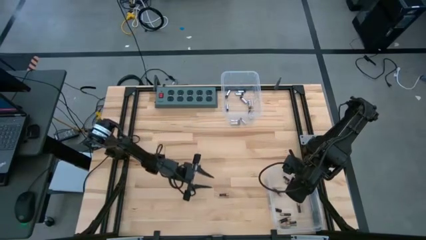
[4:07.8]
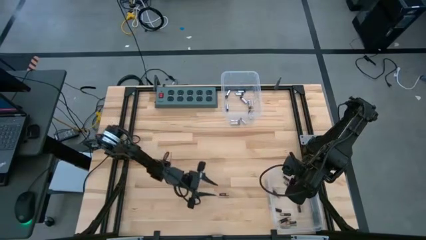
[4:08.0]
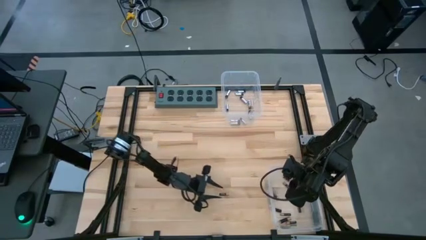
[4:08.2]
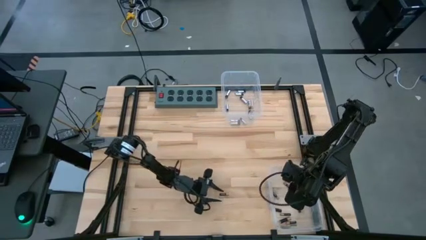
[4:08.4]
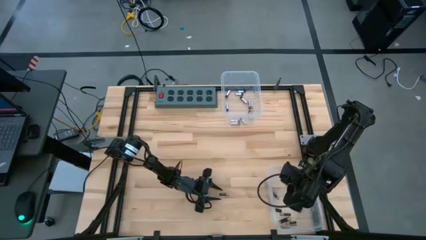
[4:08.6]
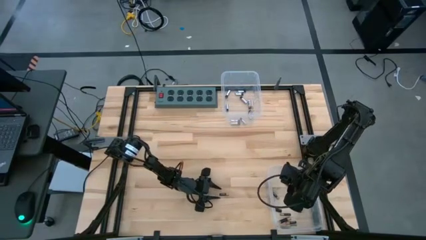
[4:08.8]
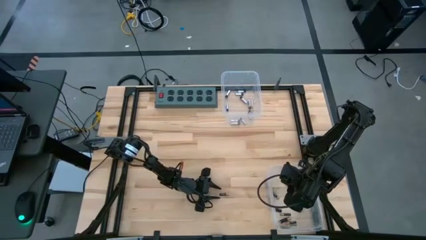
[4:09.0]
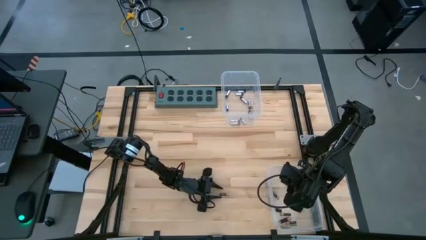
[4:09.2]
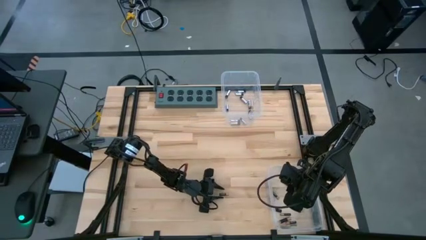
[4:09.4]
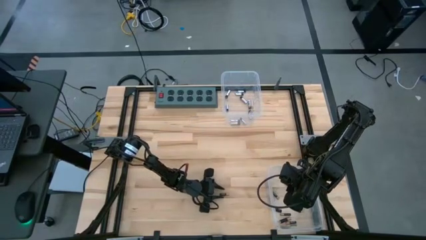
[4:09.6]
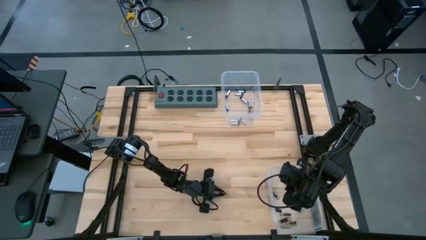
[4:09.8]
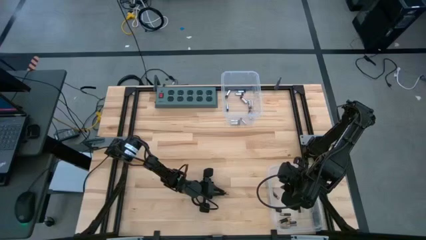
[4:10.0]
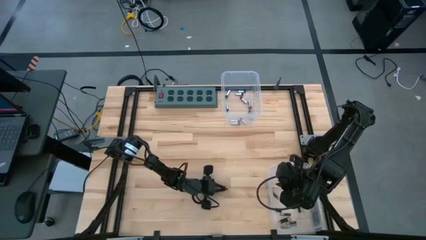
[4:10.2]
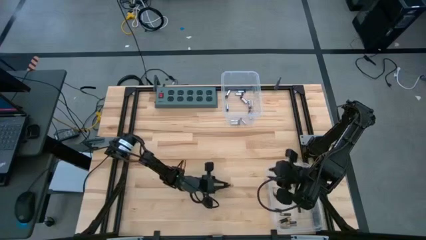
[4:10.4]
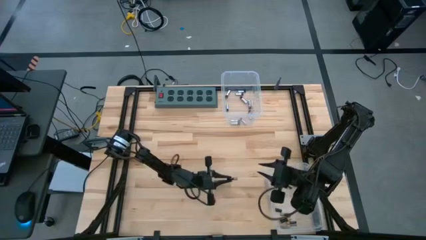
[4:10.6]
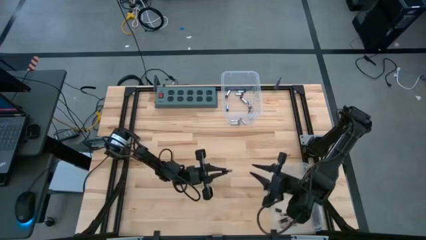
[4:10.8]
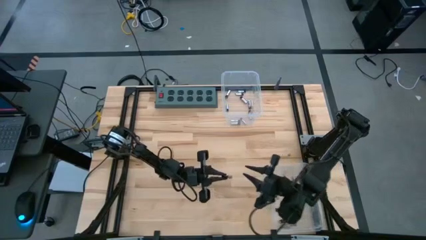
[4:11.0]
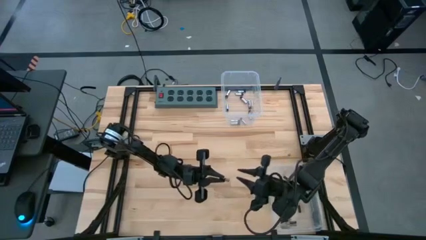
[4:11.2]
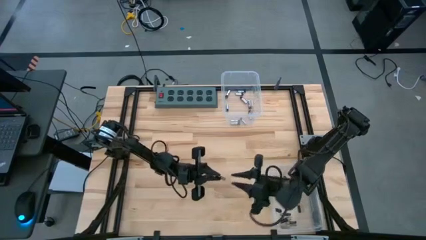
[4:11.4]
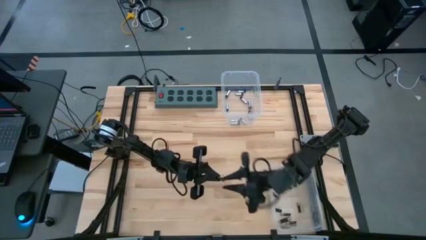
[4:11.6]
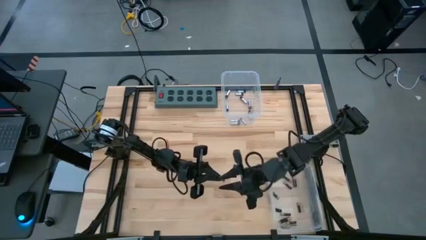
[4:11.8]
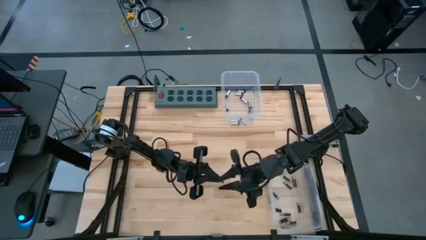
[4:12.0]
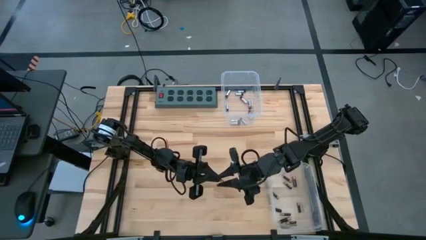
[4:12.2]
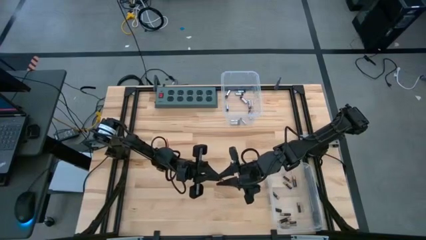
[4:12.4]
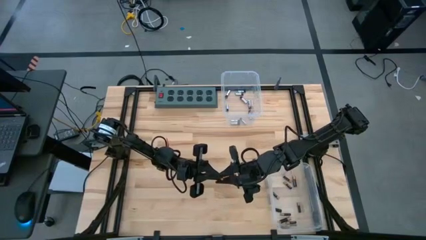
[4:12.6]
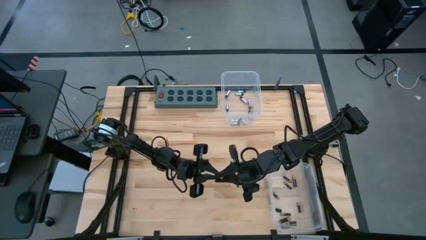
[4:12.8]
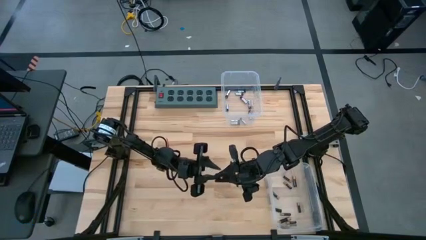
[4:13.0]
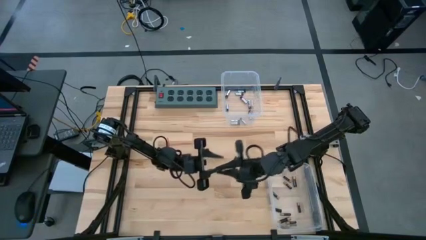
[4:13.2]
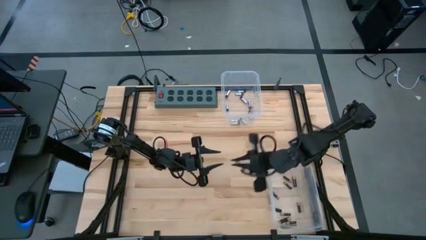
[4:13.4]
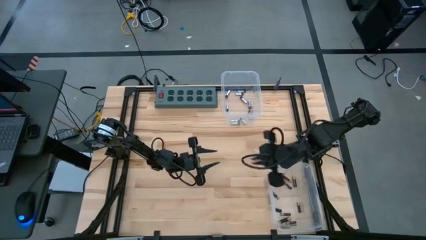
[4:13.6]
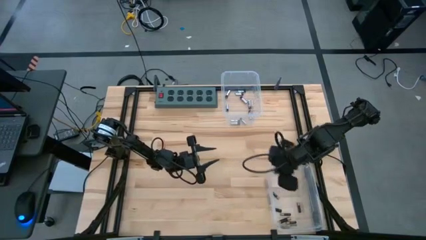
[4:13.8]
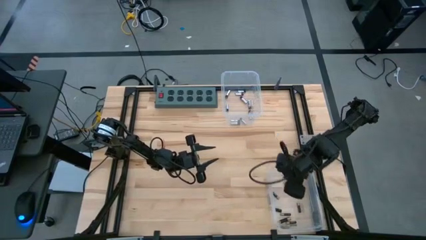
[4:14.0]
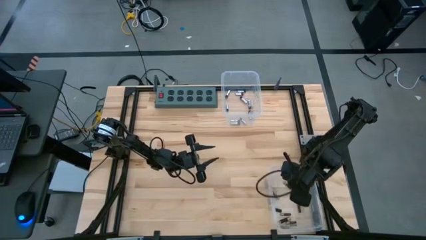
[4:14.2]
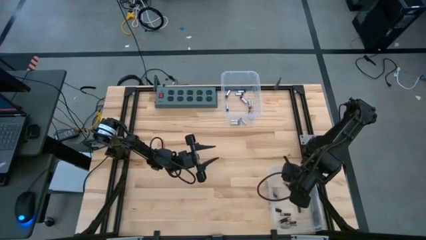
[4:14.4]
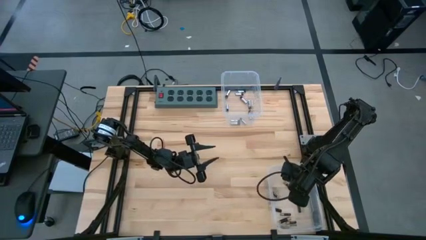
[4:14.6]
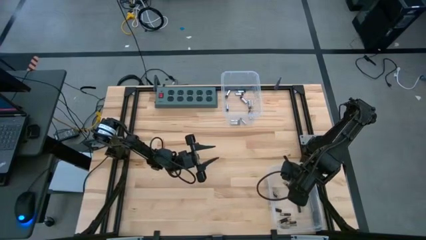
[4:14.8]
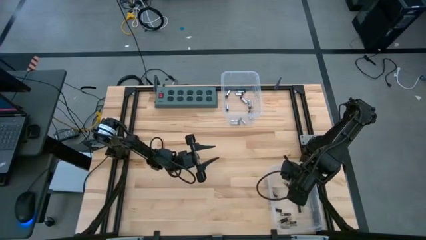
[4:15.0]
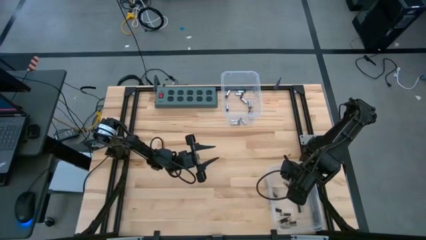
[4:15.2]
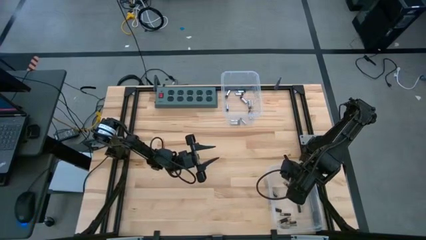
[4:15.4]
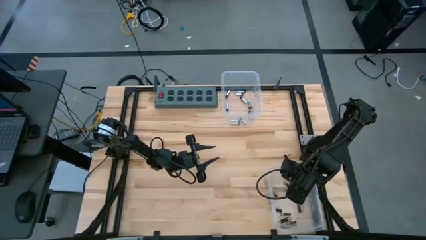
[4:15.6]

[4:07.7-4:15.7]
Task: Sort batteries
Put the black battery into the bottom transparent bin

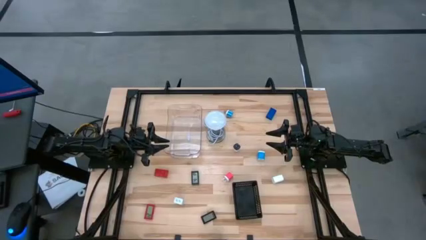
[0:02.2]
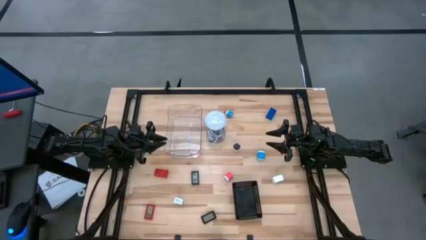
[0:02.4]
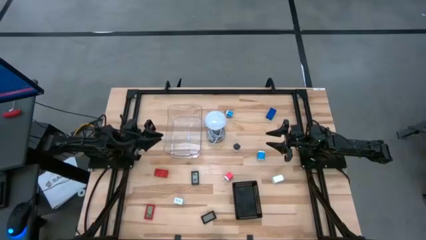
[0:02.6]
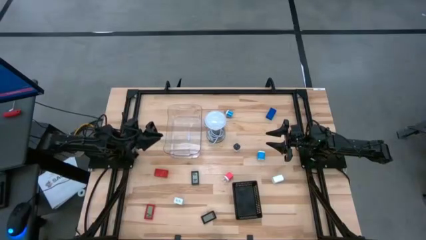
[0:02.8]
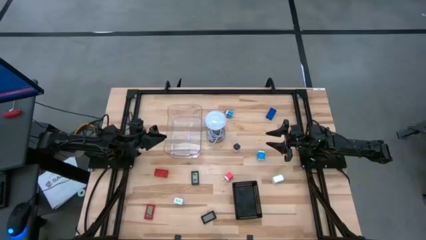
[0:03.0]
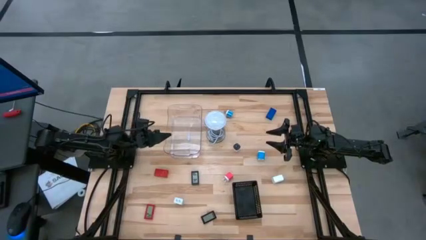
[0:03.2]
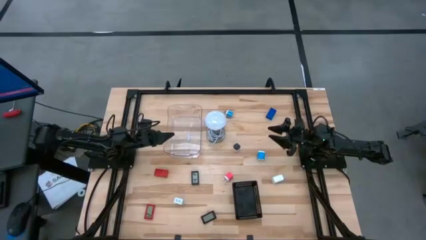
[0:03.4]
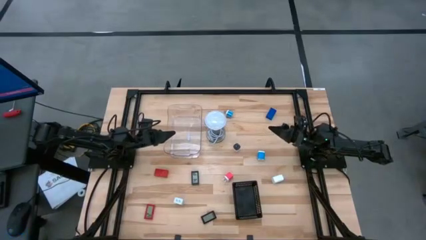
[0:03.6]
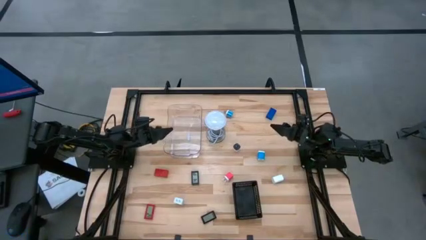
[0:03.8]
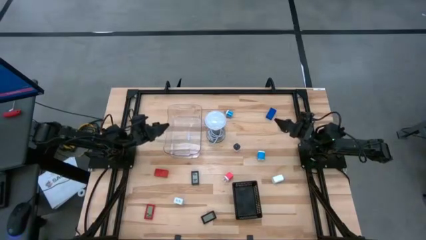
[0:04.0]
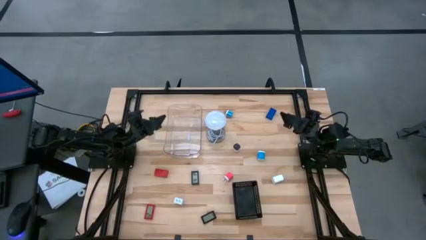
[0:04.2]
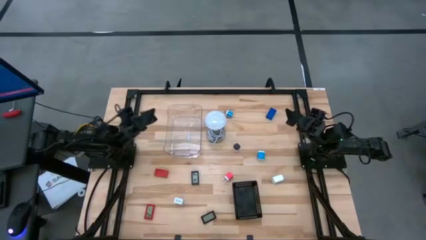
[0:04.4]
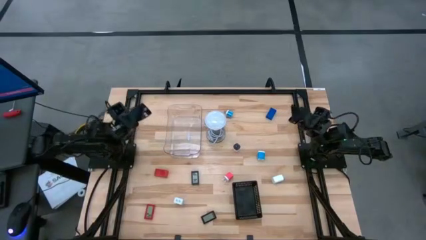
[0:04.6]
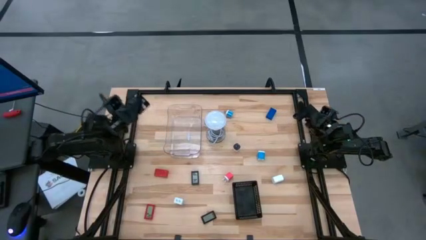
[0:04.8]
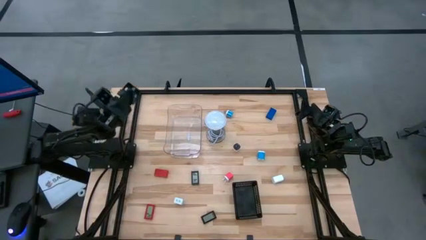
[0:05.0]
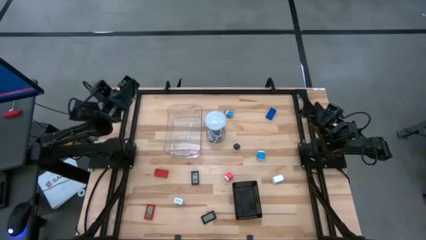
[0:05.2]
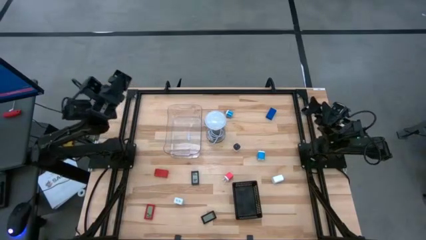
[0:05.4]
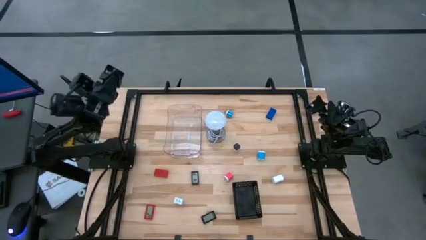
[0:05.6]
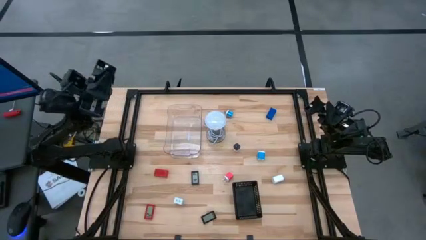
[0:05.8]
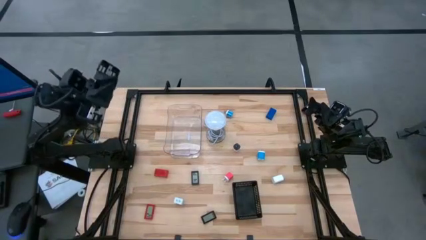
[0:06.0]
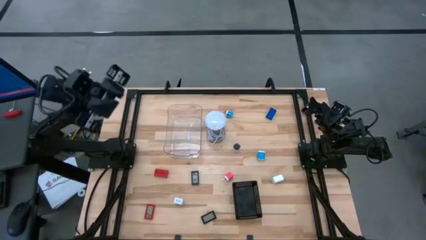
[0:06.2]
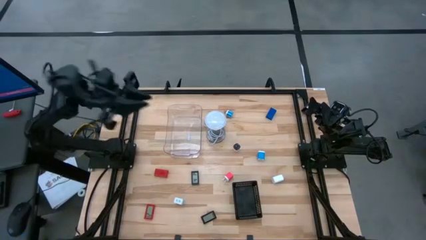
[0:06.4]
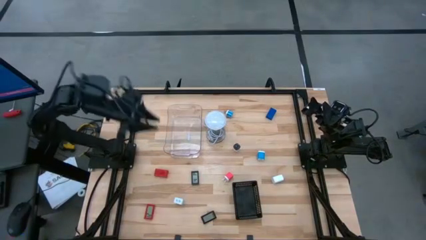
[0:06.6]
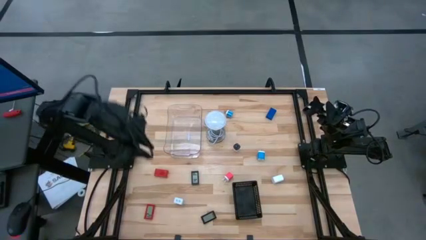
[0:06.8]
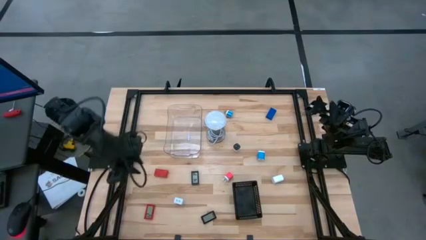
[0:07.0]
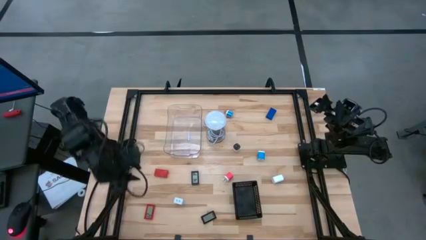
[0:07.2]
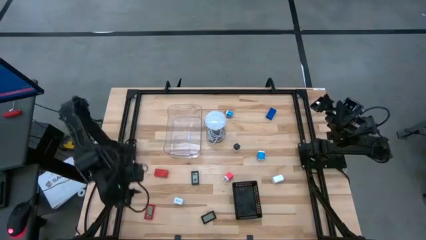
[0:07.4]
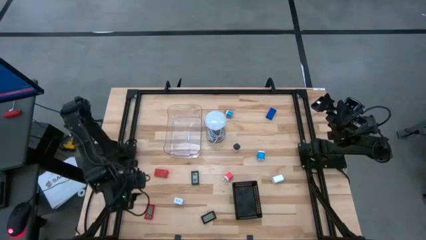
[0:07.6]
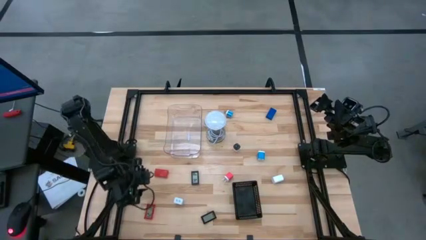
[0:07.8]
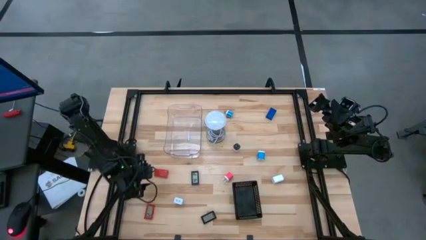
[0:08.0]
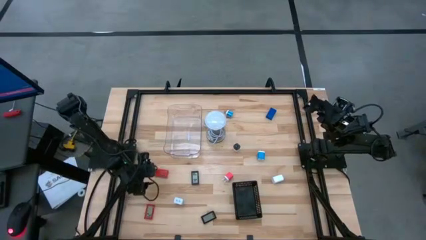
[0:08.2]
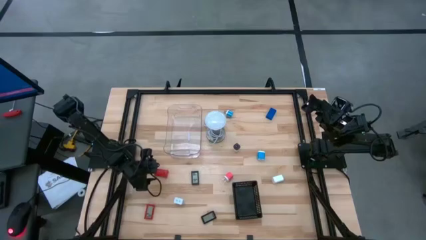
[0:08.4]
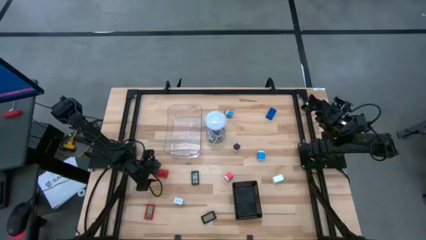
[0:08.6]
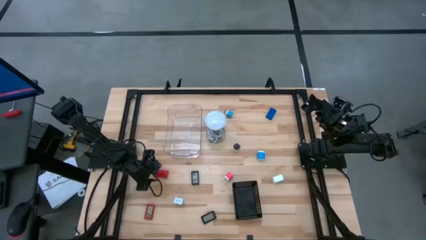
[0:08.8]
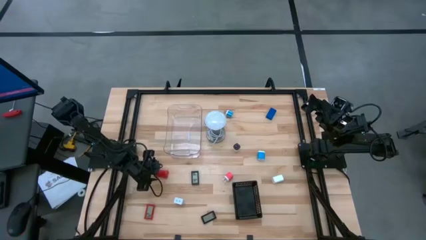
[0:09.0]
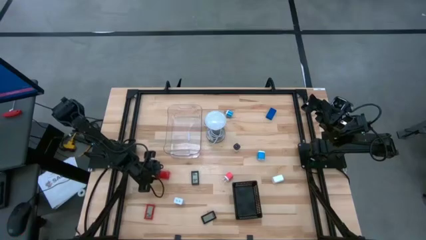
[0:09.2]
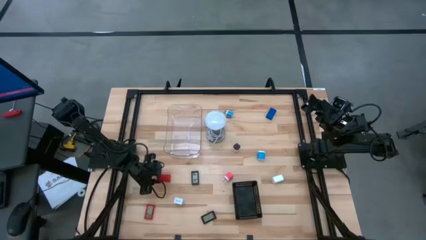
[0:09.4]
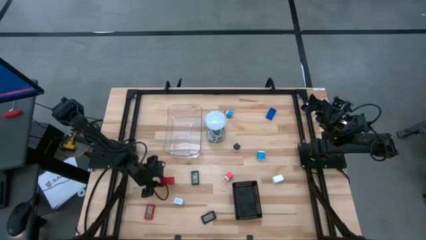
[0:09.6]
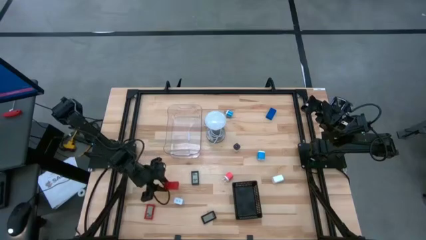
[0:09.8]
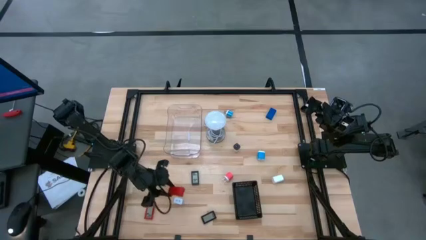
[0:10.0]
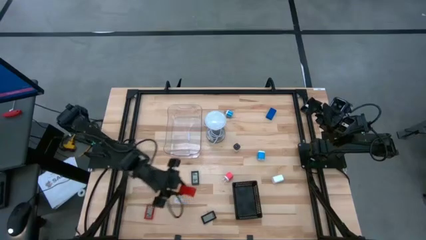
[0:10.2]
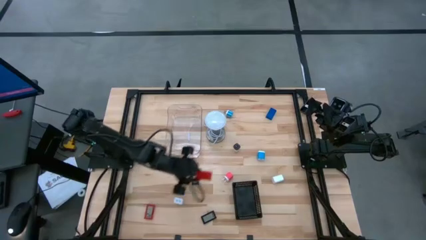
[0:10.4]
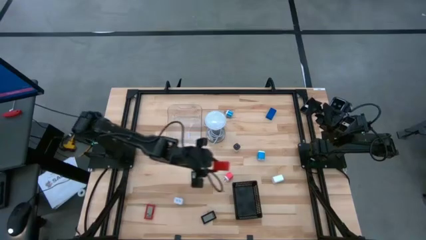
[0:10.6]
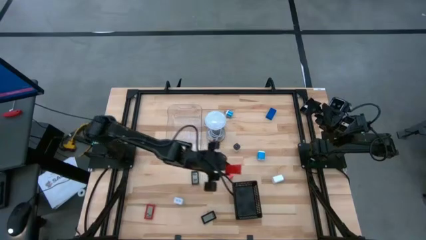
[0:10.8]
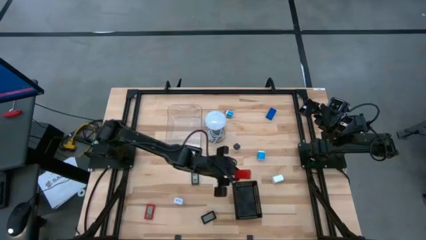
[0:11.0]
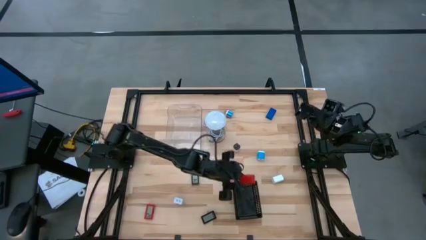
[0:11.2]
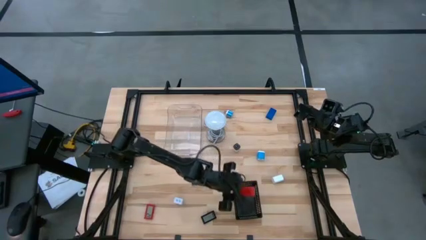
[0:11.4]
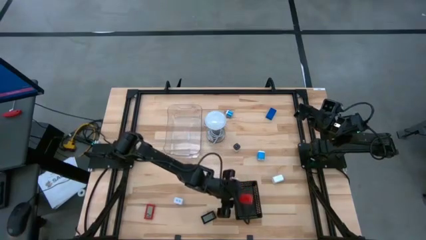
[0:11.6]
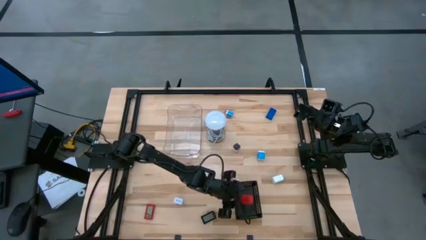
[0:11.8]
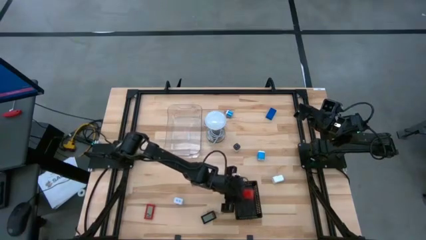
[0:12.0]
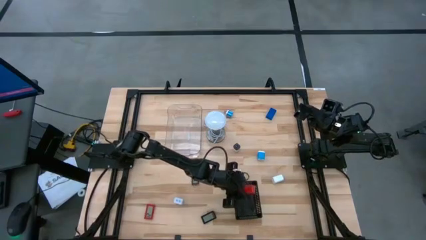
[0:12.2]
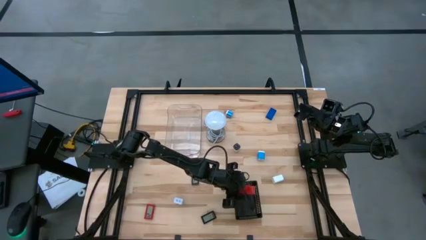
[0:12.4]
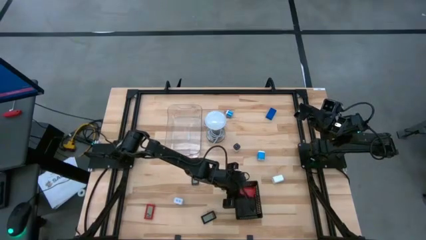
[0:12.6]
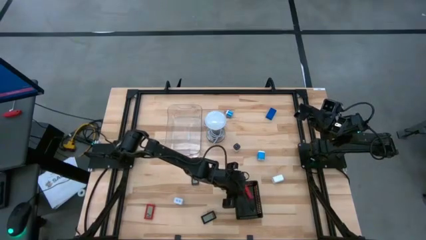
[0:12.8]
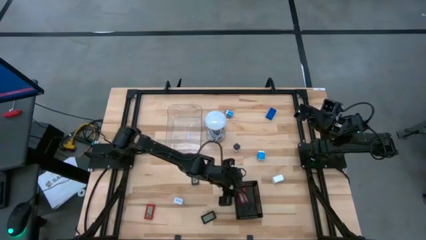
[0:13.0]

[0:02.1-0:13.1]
Task: Pick & Place Office items
Put the top red digital clock into the black bin
